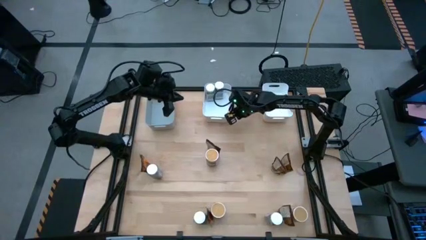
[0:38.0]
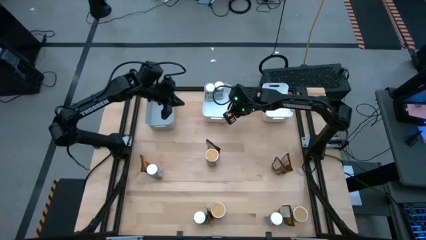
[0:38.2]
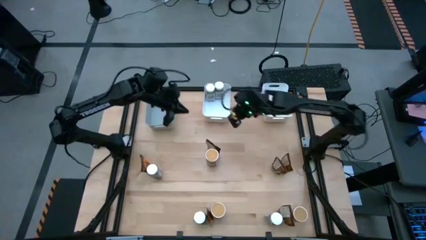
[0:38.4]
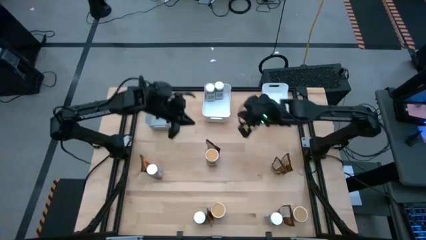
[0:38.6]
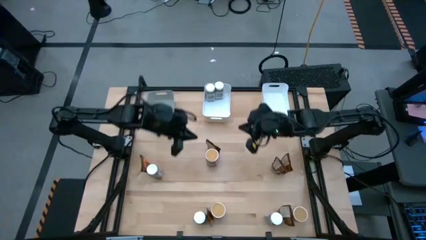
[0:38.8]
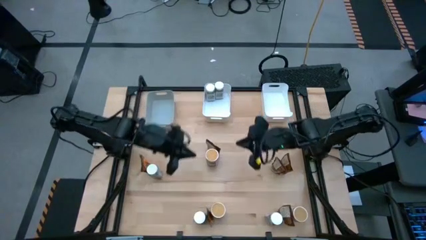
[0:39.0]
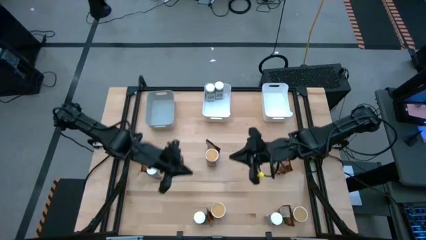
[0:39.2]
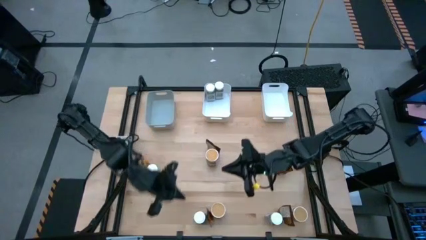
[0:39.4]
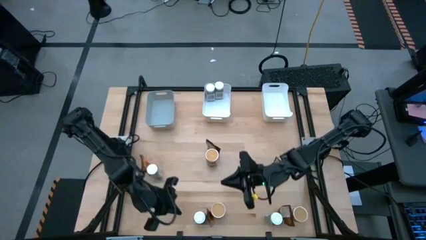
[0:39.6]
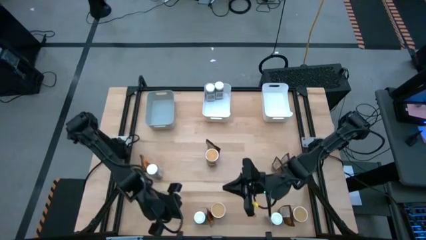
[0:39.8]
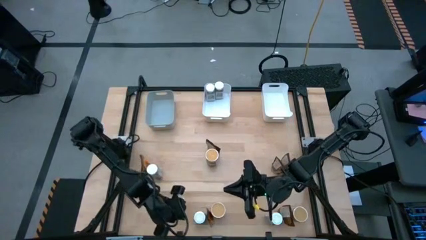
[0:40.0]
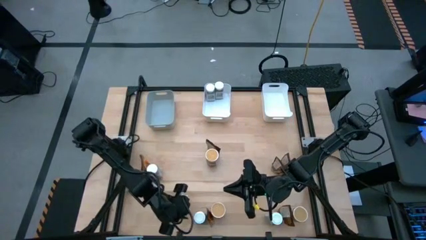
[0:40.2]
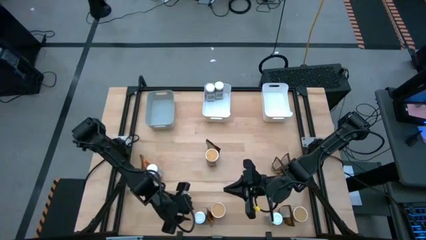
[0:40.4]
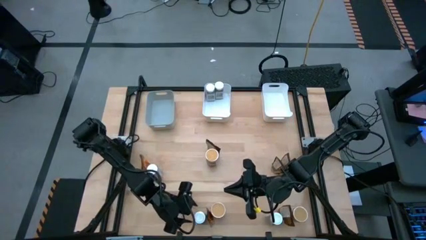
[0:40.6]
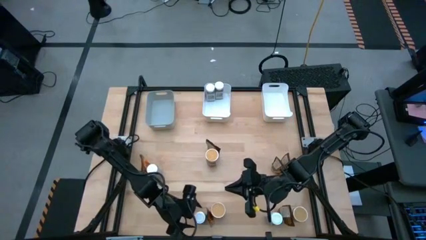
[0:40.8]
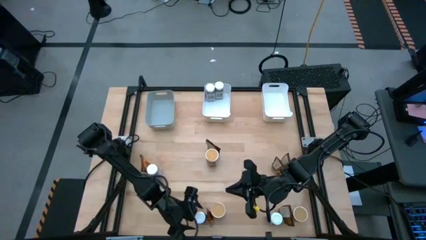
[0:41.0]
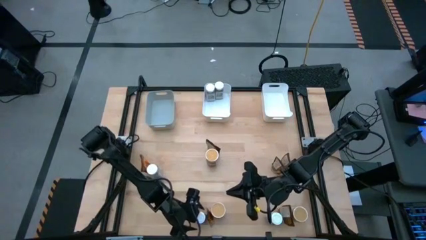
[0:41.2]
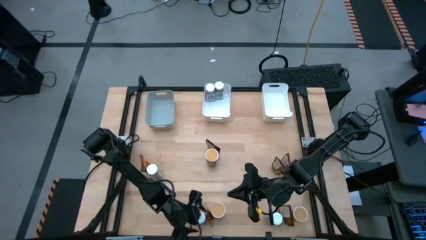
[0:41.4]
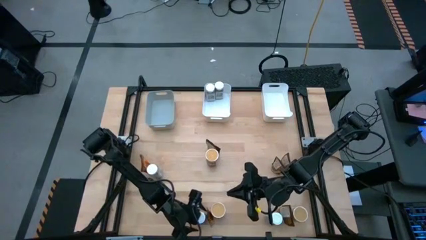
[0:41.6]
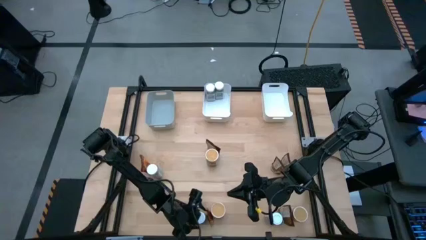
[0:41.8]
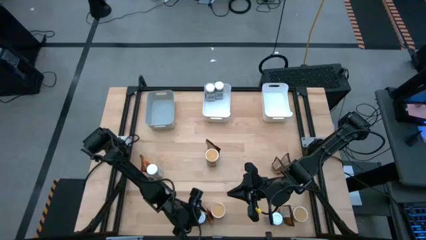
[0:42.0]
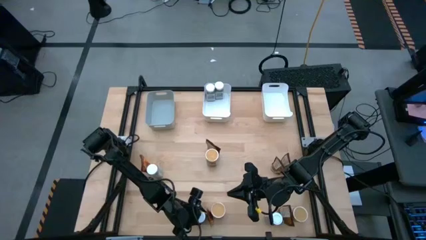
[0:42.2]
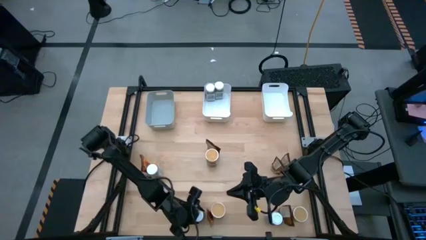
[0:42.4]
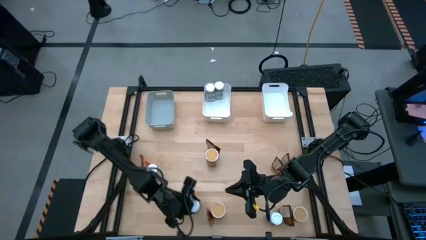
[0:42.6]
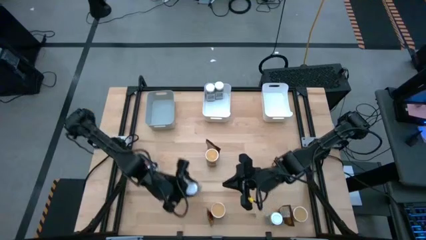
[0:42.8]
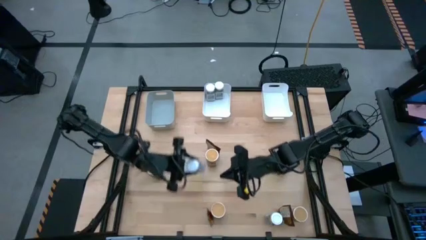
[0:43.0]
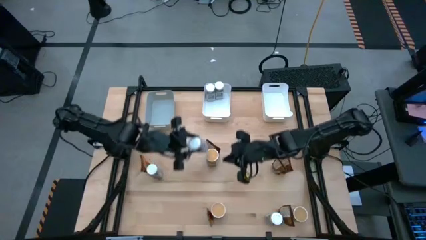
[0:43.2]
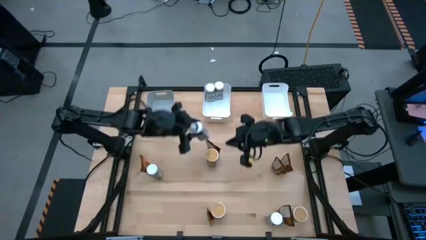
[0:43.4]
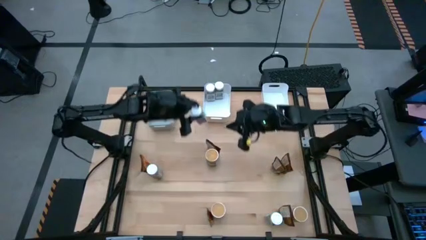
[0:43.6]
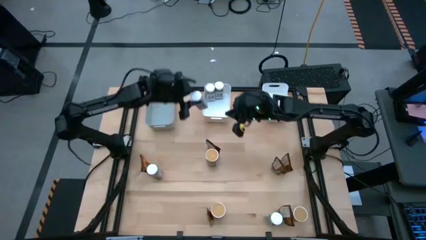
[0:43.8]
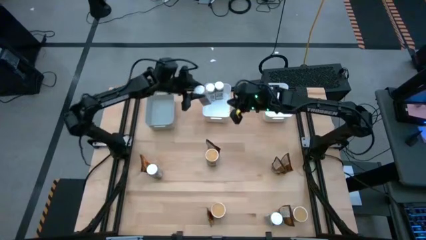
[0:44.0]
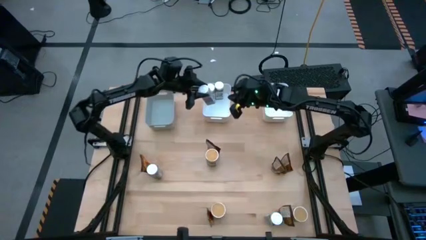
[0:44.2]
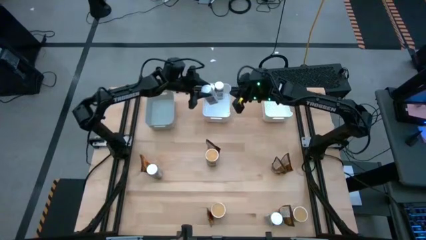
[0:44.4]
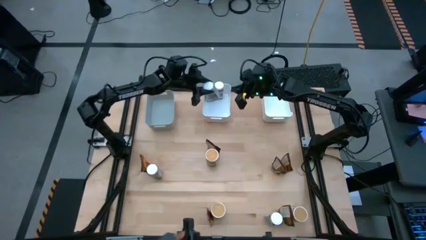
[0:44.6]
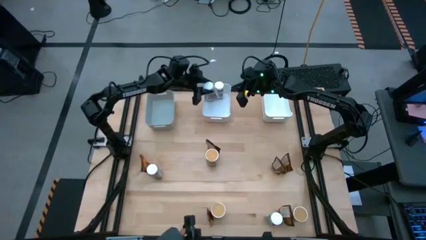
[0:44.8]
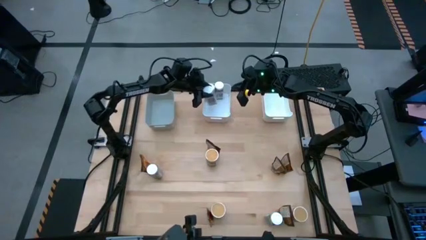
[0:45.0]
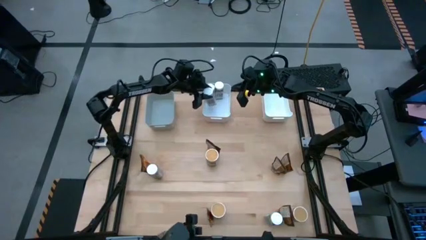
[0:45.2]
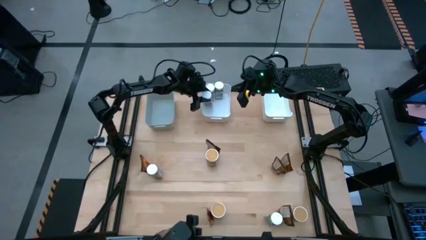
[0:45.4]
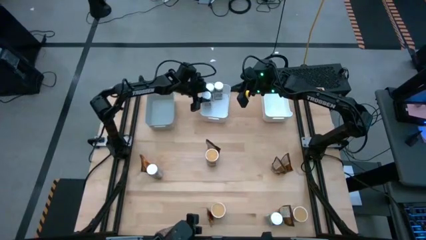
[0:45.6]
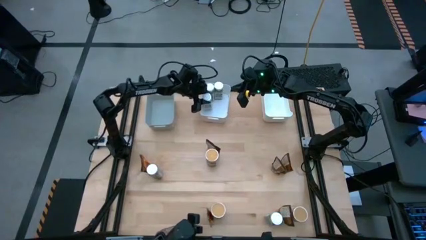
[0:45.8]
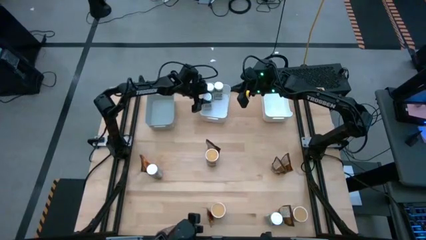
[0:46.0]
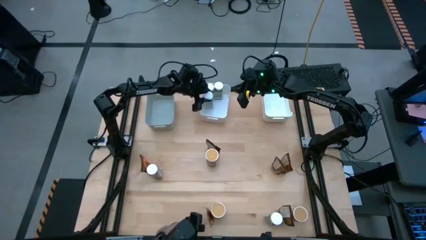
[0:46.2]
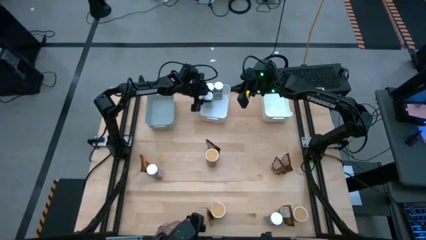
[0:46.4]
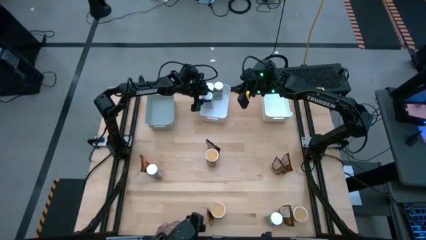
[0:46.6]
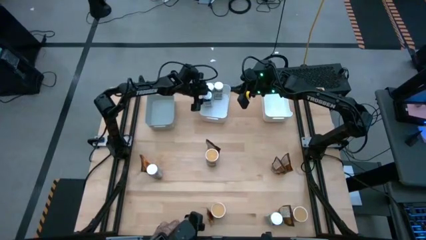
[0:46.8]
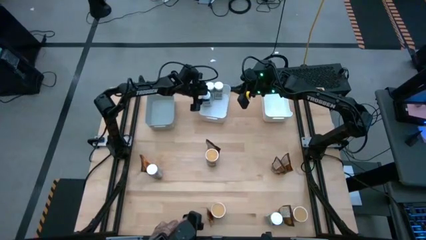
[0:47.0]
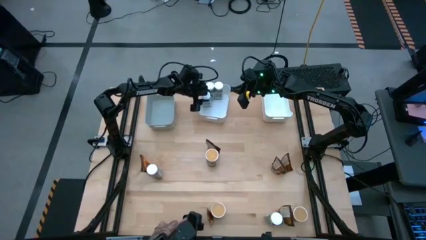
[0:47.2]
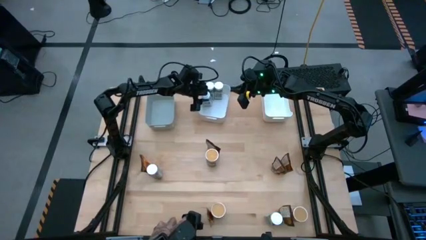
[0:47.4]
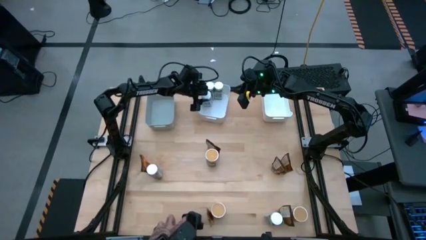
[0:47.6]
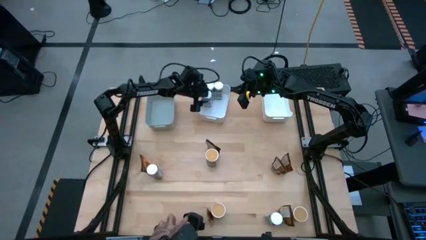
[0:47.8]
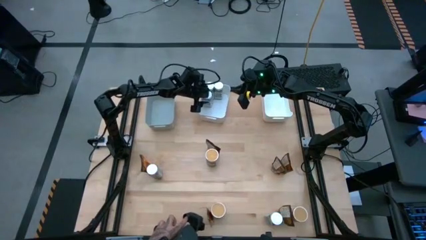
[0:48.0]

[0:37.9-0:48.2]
Task: Sort spices by type
Put the white seasoning bottle into the left white bin

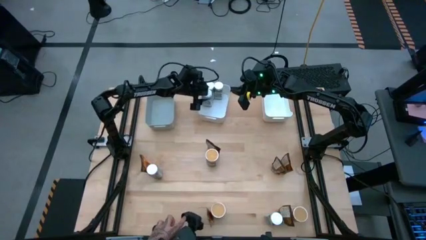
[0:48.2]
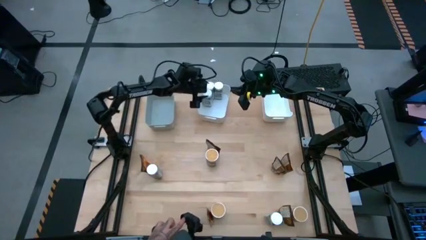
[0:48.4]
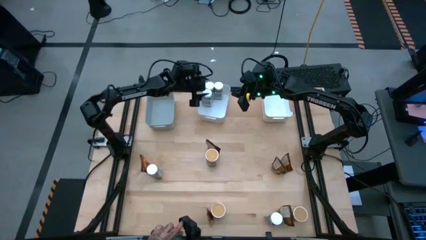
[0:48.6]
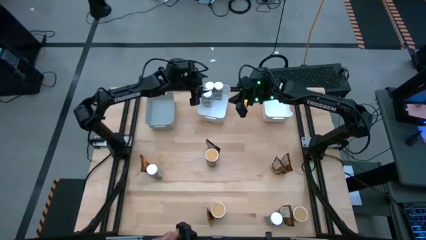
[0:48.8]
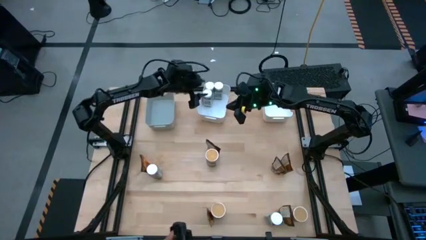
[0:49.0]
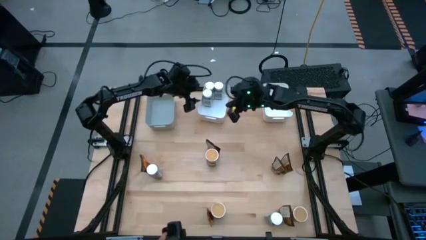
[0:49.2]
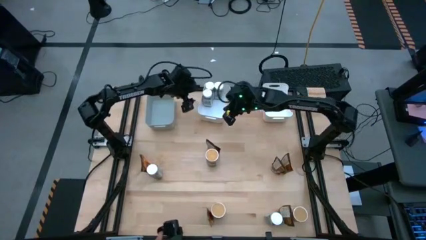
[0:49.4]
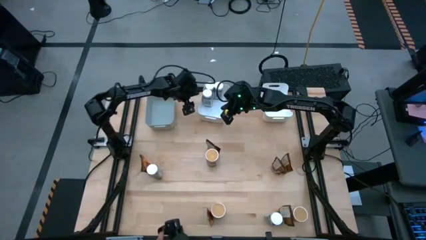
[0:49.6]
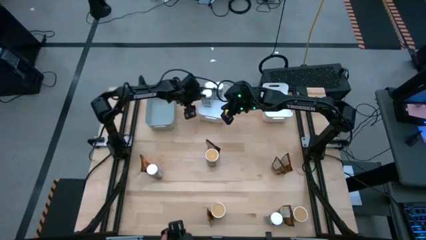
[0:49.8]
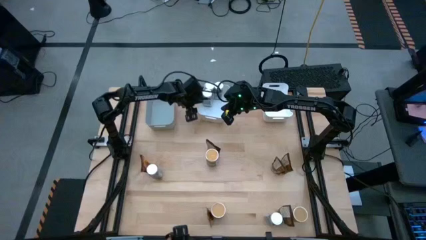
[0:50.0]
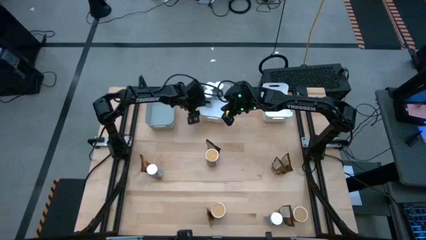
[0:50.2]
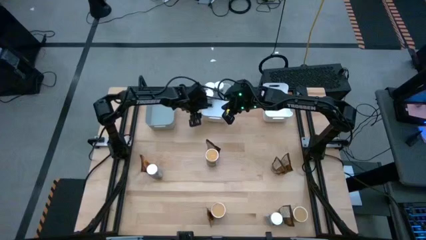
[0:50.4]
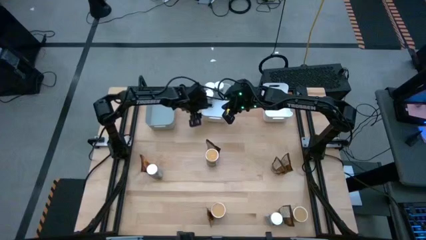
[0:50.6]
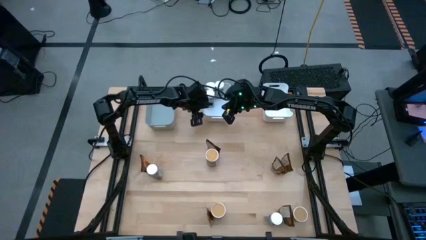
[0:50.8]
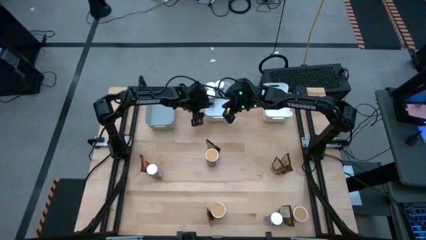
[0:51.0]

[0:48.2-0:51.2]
Adjust the left white bin

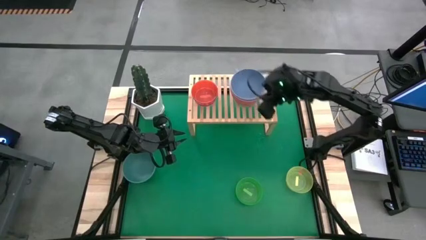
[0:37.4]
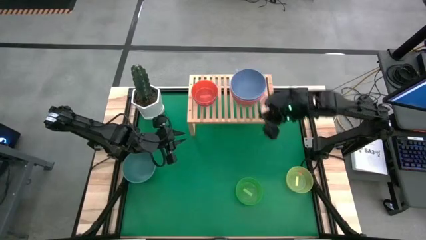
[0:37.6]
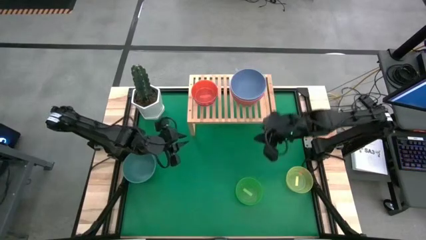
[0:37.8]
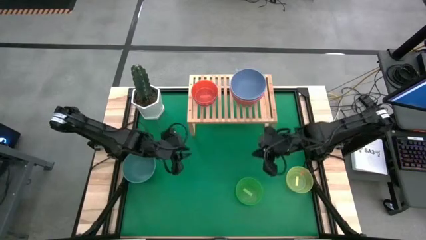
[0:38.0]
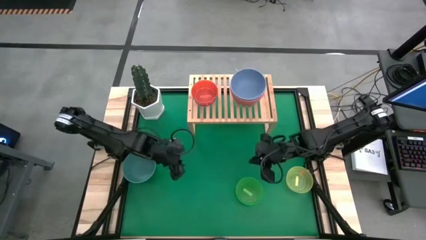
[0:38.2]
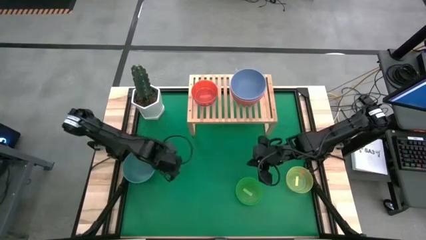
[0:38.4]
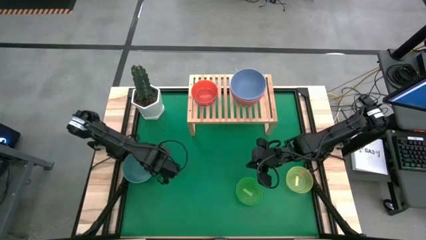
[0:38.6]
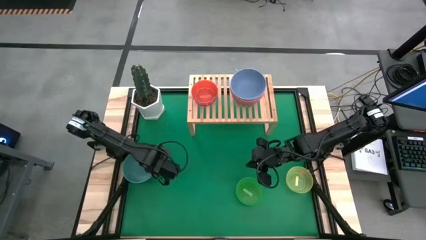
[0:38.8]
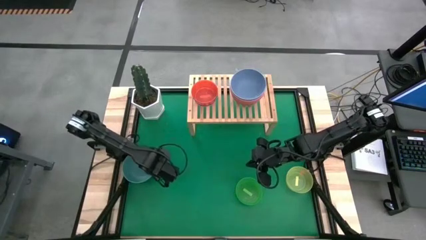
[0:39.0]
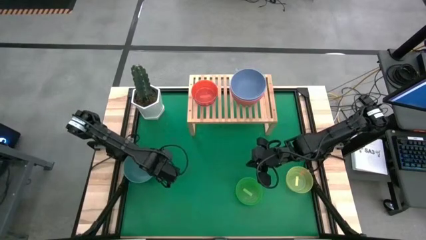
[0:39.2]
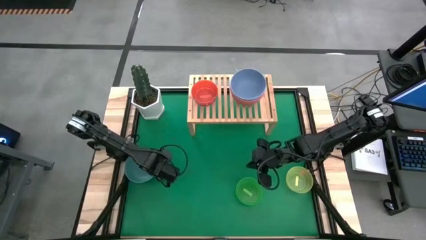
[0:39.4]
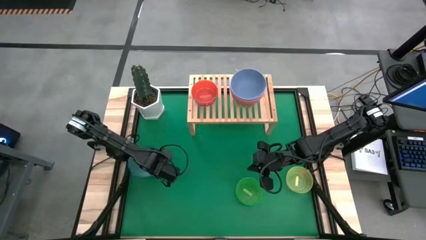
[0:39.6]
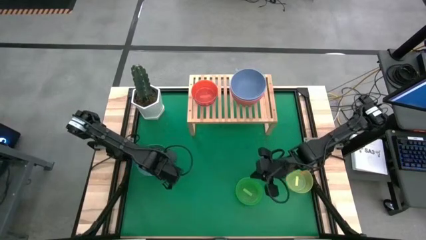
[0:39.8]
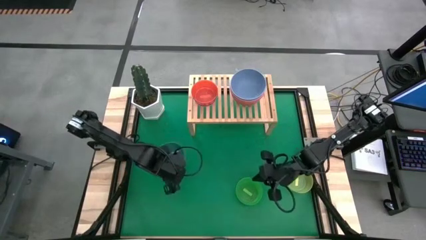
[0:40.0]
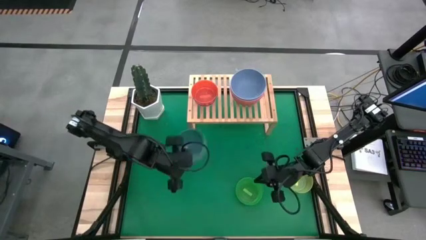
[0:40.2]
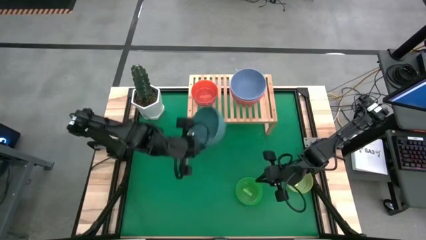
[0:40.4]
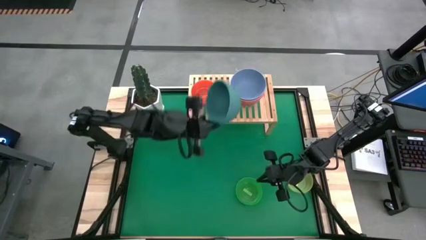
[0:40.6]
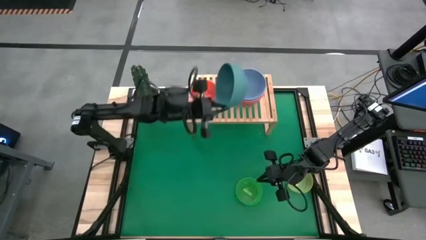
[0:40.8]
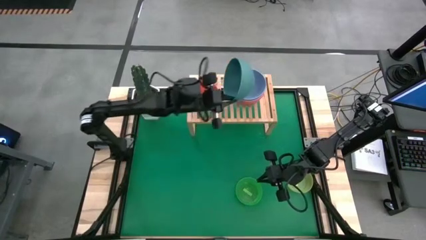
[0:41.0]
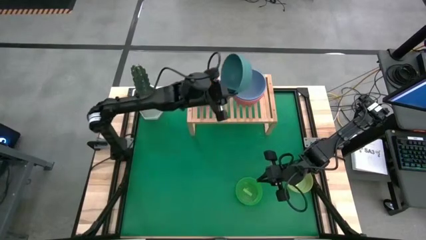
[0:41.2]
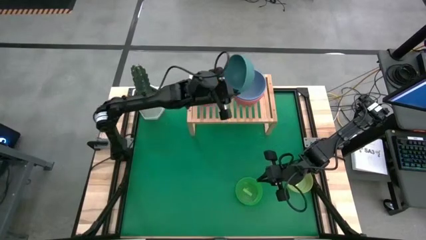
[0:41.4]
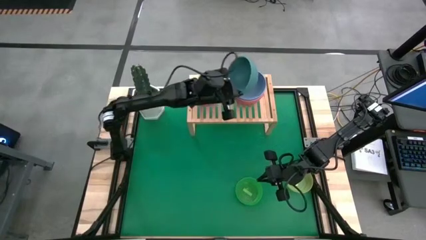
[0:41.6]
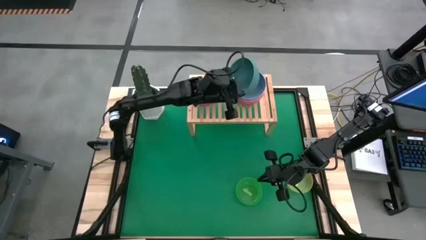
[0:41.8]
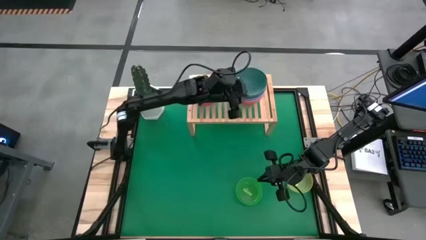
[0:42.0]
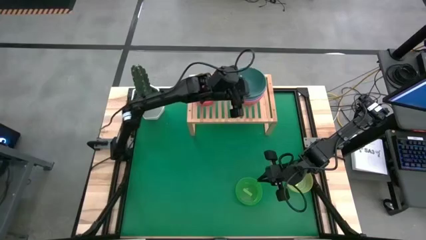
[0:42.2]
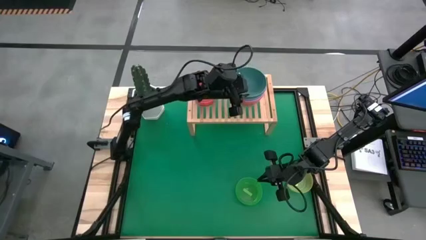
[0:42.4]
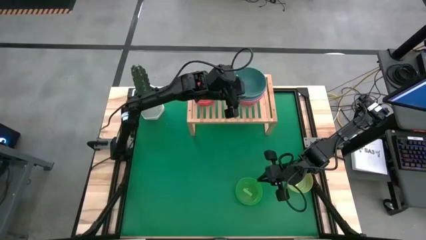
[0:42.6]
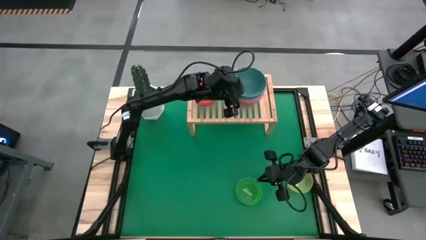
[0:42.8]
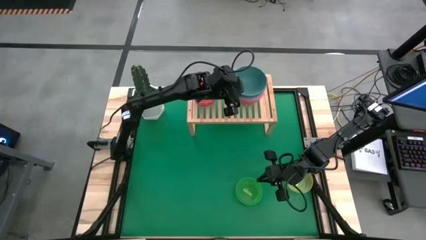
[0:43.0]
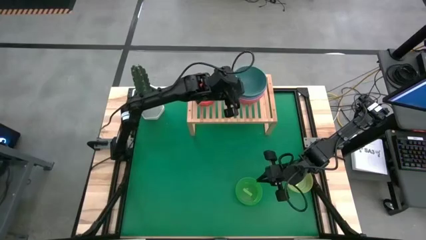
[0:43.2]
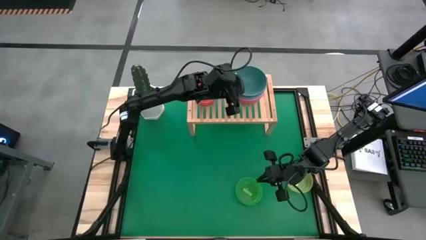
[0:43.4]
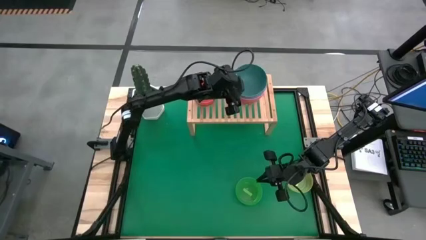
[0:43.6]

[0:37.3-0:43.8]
Task: Place and stack bowls onto a shelf
Stack the dark green bowl on top of the blue bowl on the shelf
